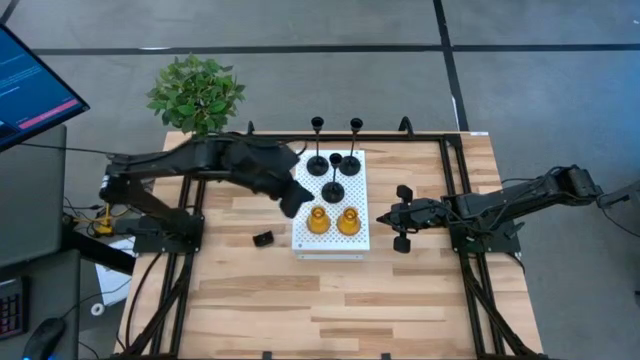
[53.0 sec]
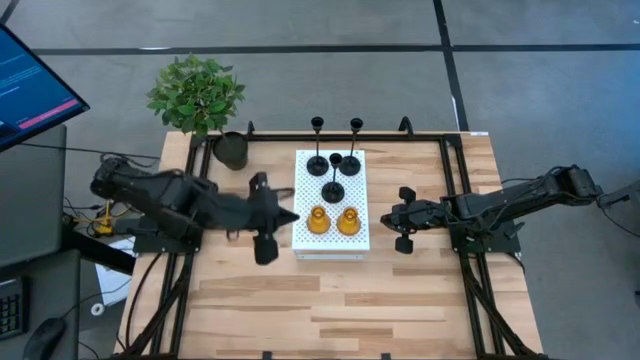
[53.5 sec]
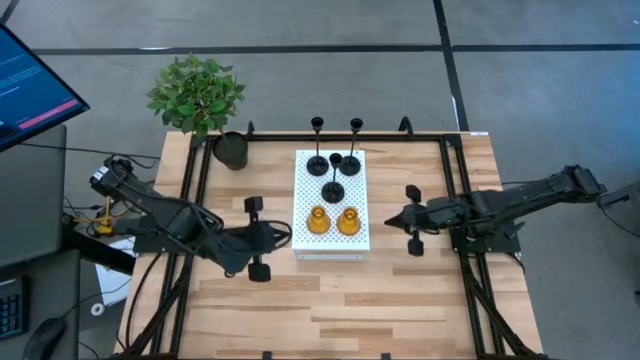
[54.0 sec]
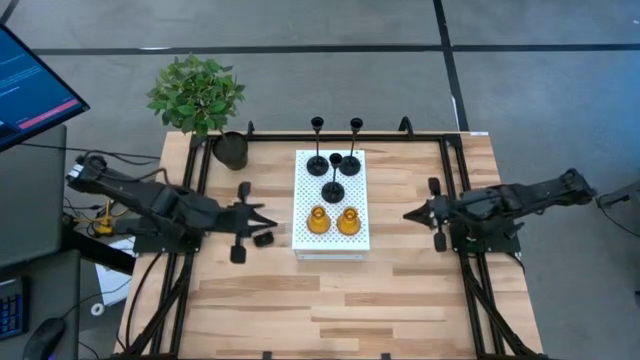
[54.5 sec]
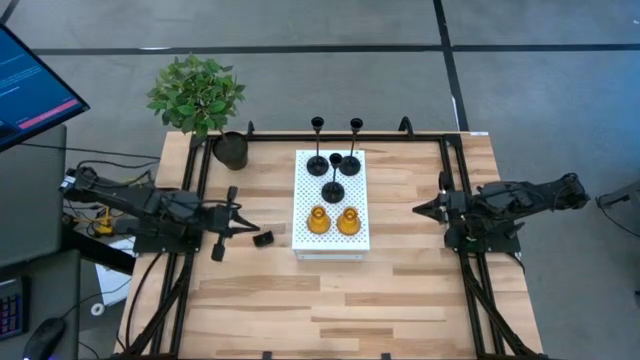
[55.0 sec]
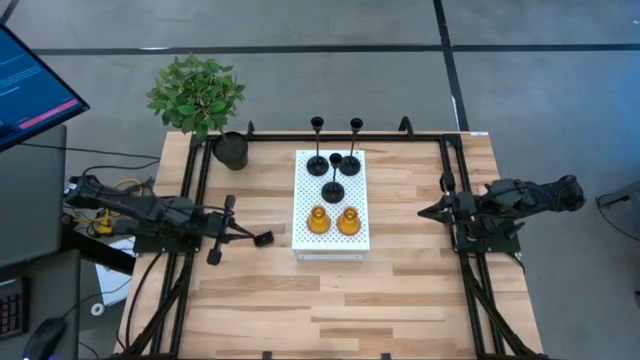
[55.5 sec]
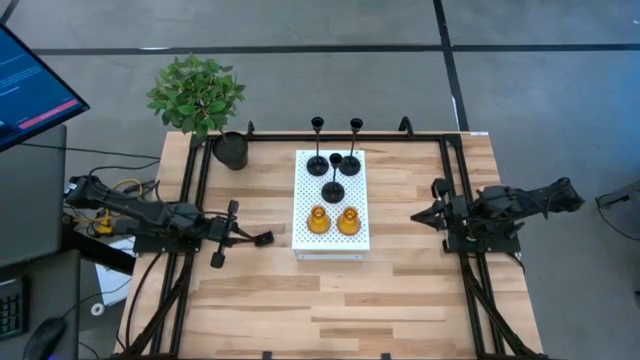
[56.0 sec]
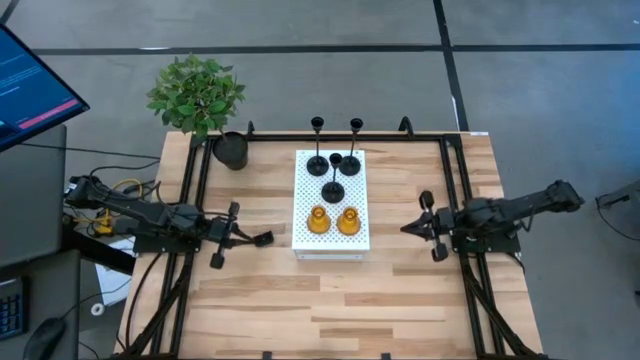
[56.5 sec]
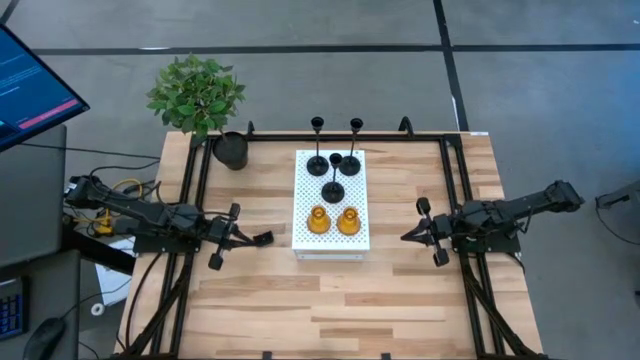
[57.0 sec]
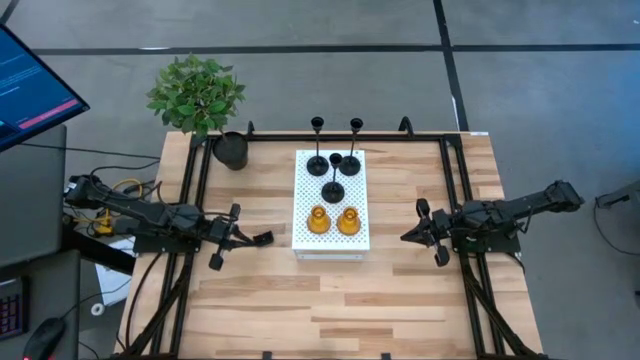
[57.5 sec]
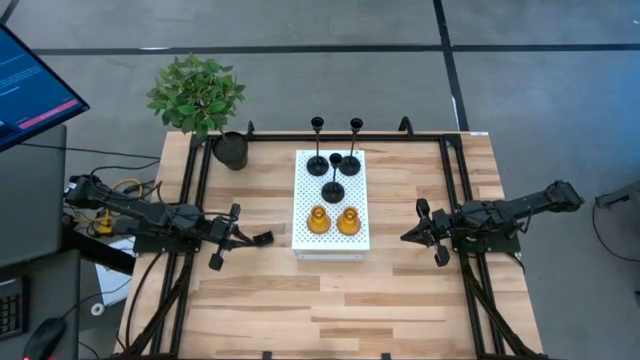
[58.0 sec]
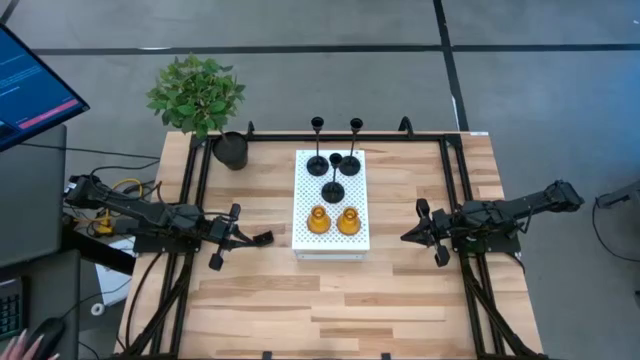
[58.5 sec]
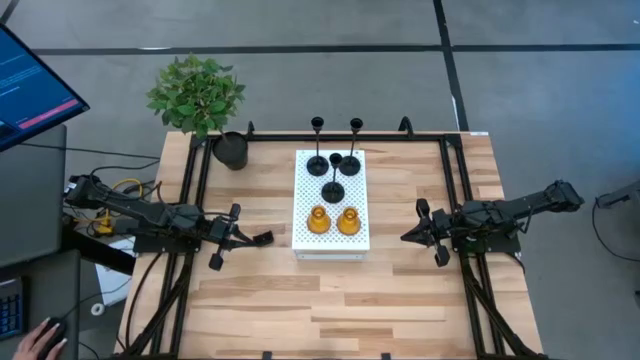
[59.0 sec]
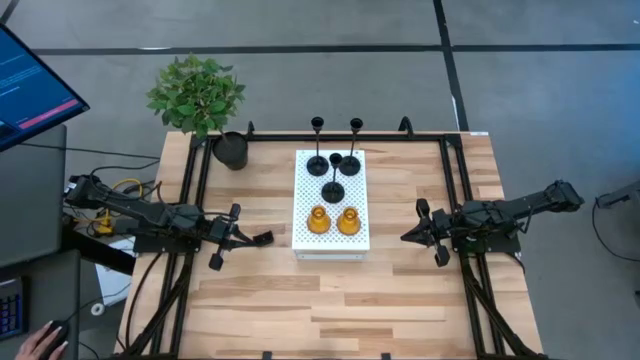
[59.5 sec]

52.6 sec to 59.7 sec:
Task: Pick & Place candle stick holders
Return to Home Position

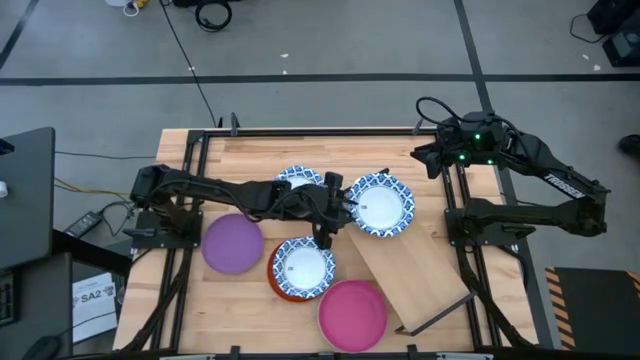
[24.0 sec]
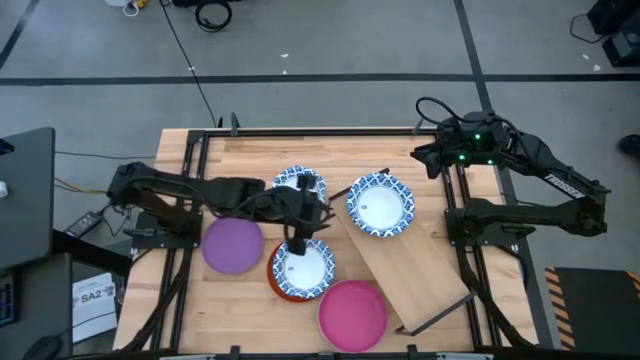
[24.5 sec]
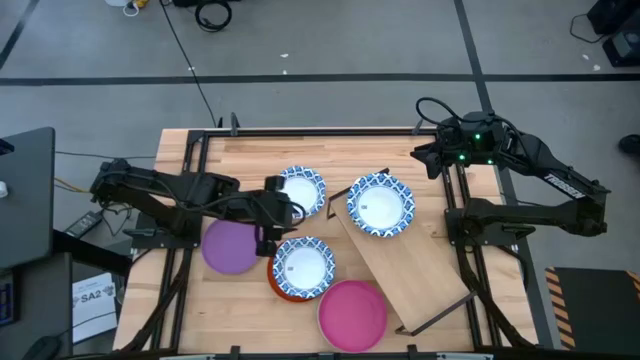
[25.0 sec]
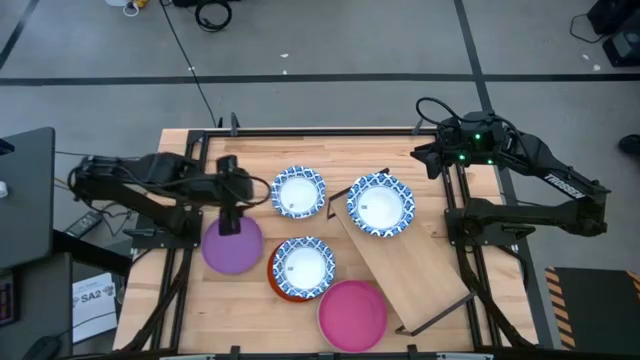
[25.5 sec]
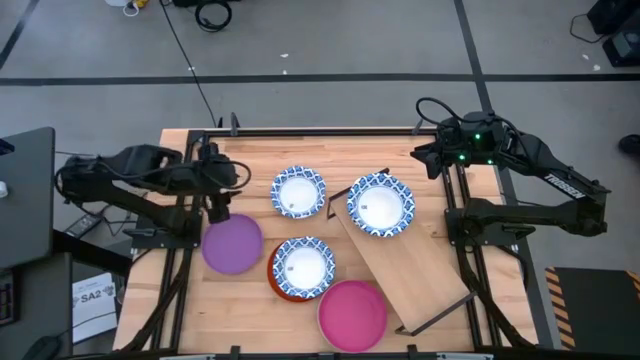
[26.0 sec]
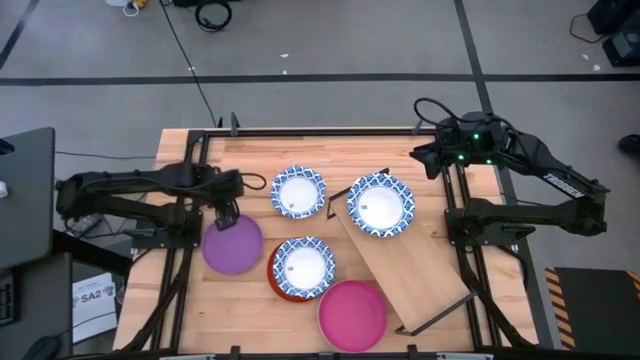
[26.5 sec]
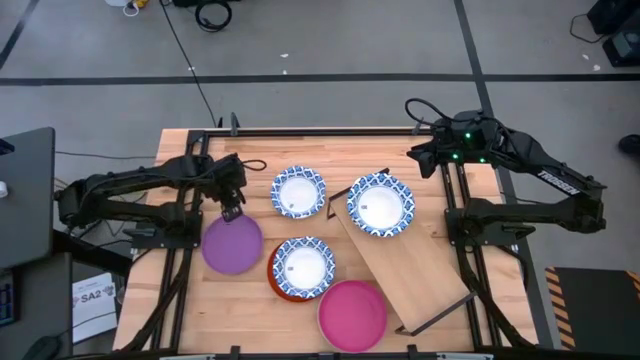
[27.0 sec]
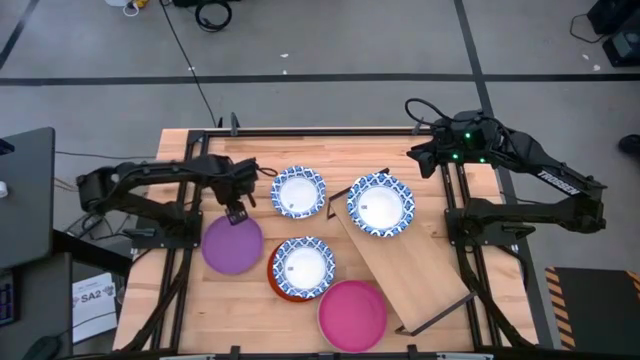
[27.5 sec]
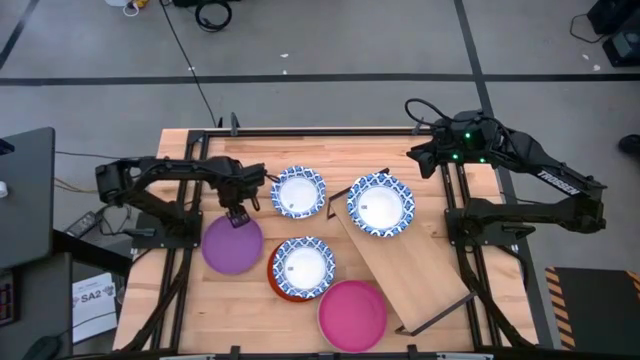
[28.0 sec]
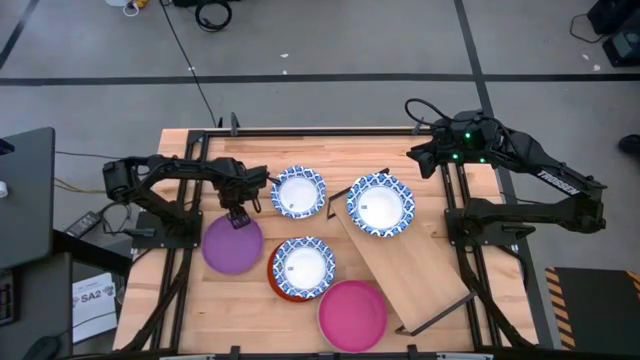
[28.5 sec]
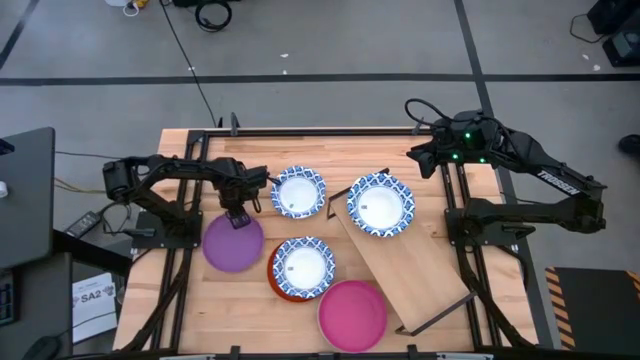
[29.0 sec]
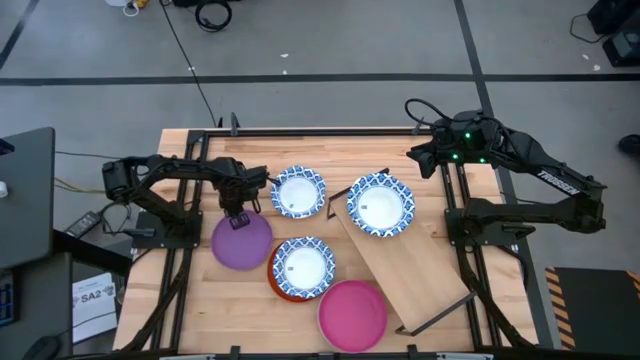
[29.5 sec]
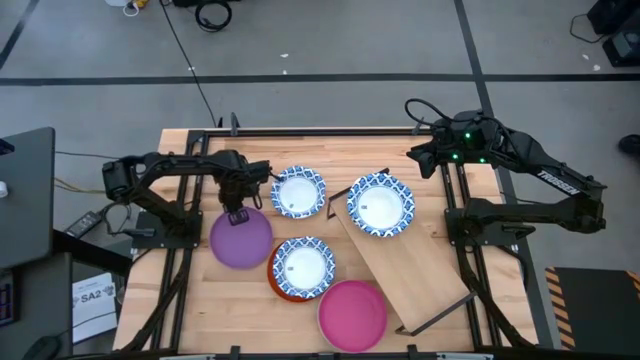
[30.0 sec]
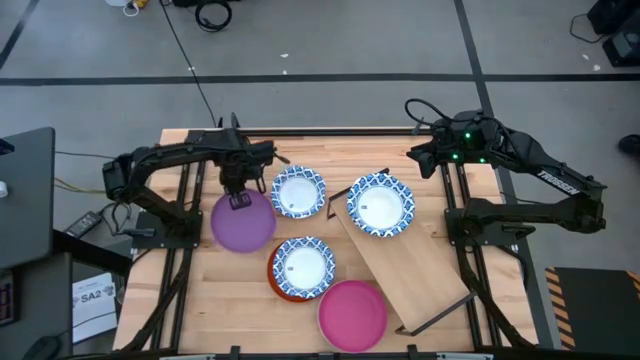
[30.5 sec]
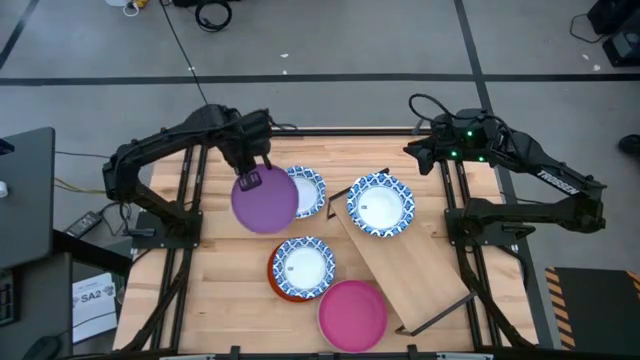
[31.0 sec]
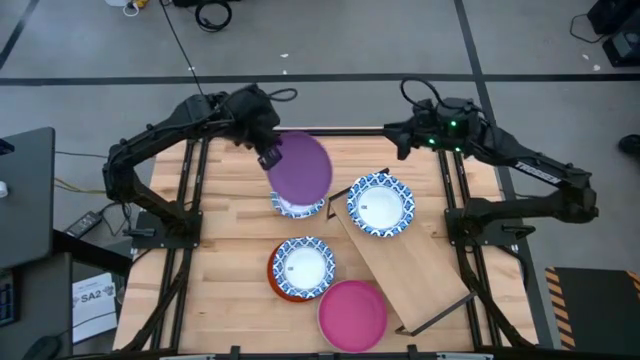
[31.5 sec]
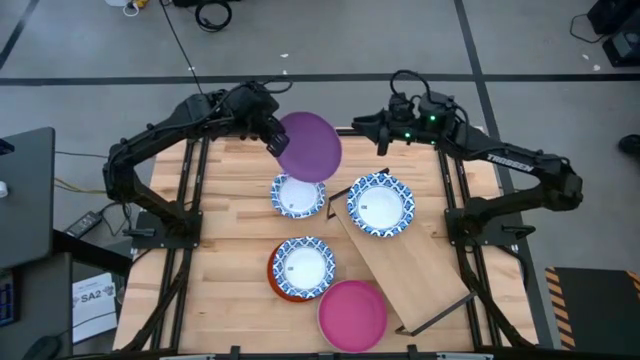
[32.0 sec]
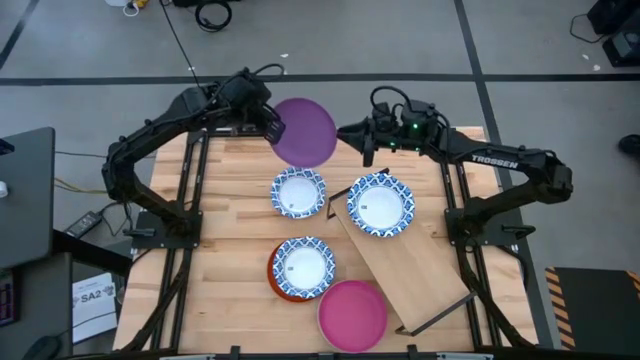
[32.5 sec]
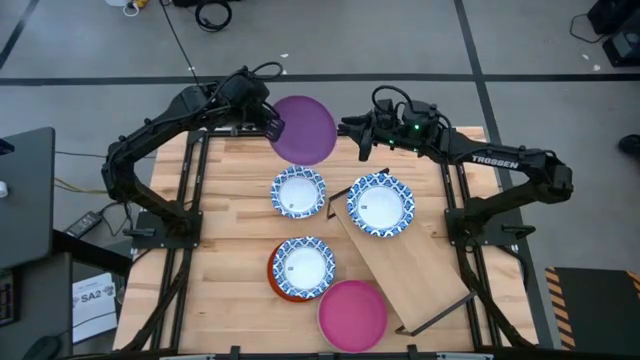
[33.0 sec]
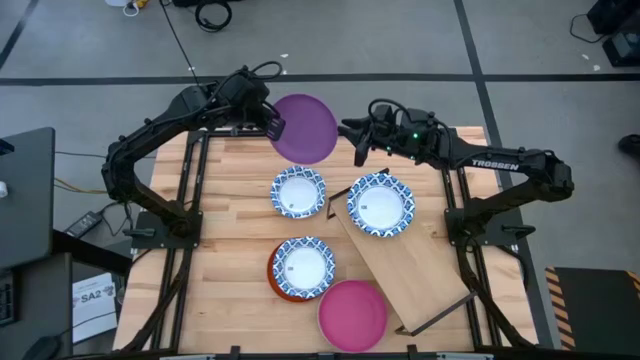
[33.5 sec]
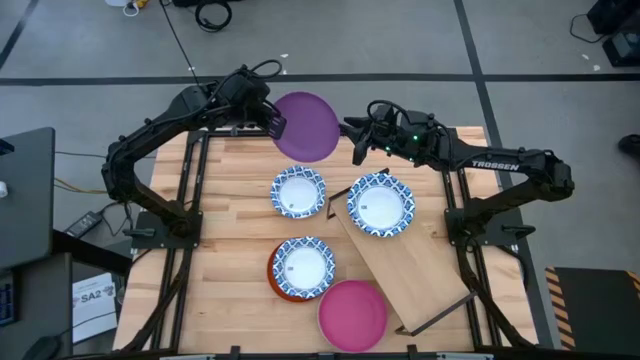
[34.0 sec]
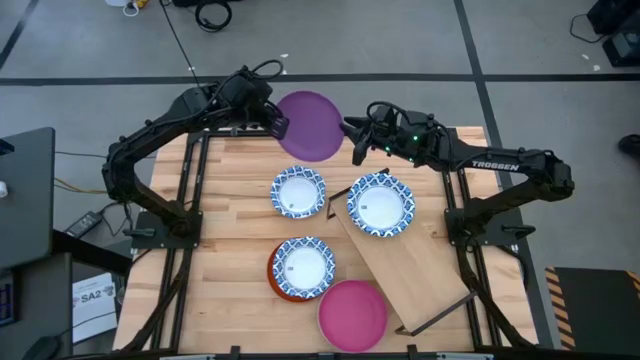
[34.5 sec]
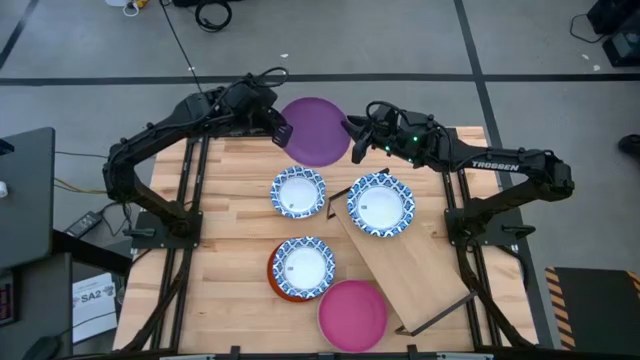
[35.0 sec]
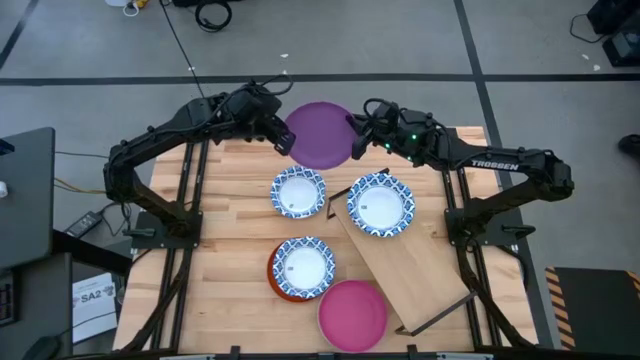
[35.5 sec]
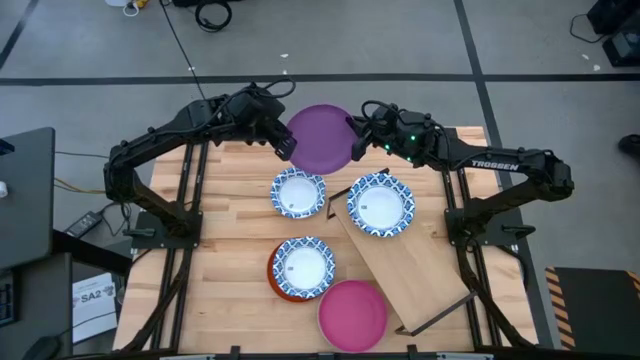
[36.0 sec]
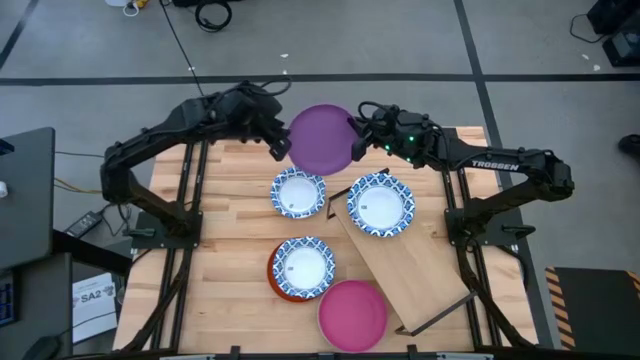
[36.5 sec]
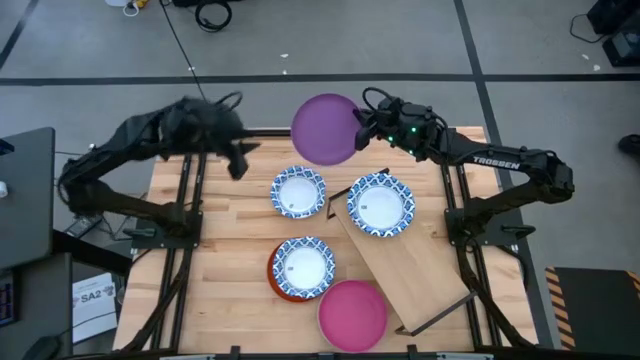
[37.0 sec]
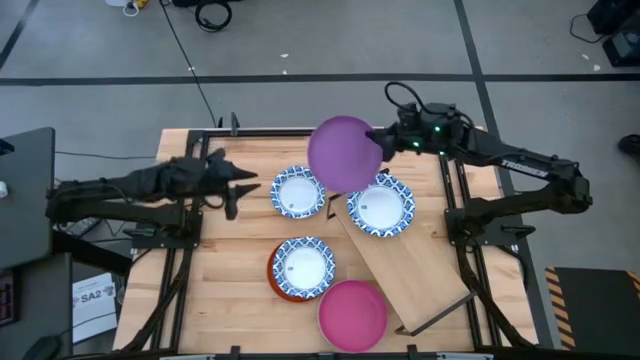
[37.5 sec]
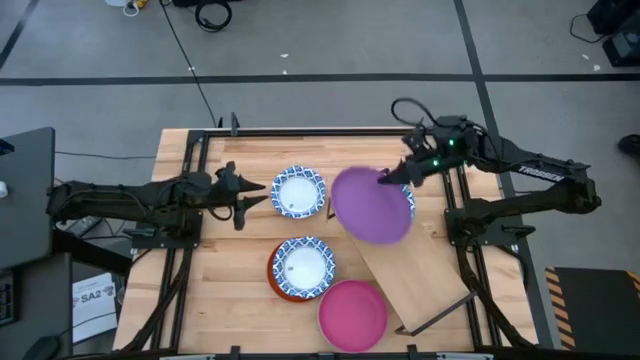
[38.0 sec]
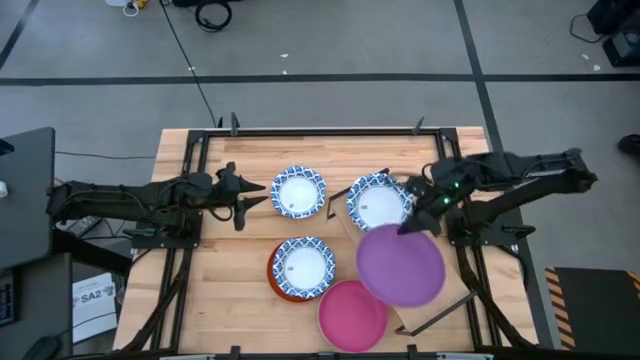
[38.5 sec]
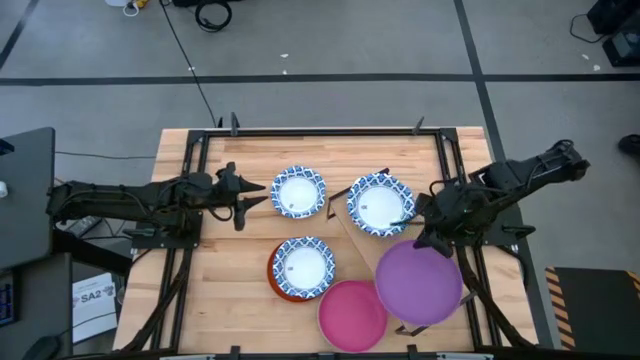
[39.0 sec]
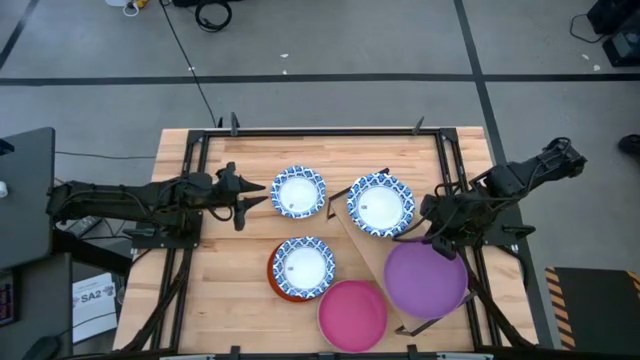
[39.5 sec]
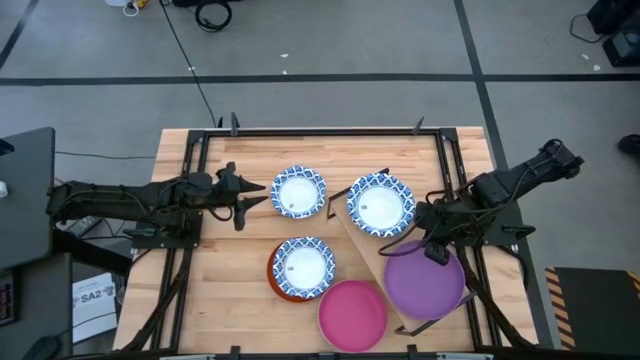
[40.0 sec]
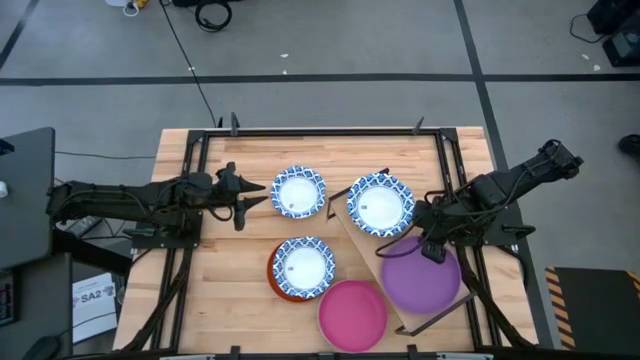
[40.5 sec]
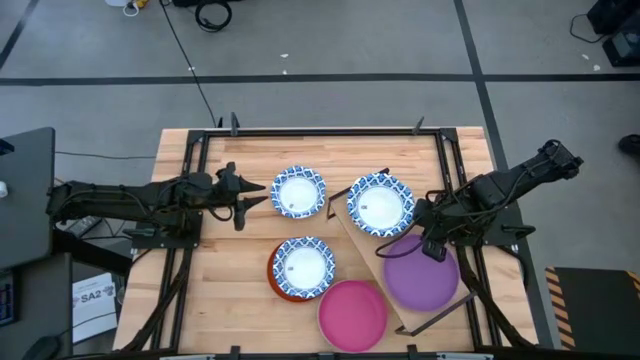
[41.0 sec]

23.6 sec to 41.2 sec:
Task: Place and stack plates onto a shelf
Put the purple plate on the shelf
